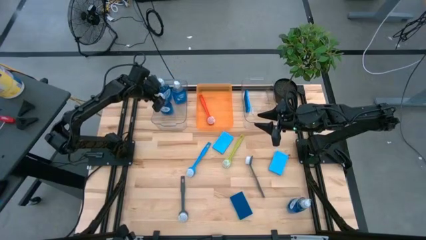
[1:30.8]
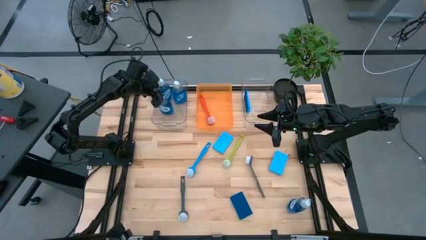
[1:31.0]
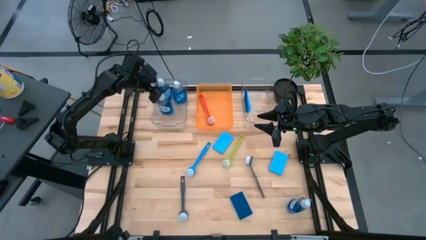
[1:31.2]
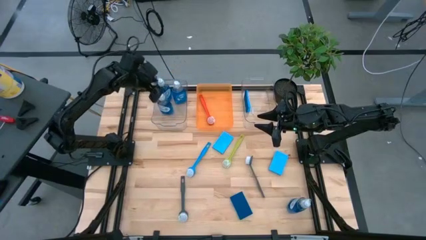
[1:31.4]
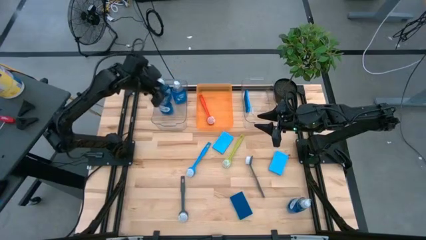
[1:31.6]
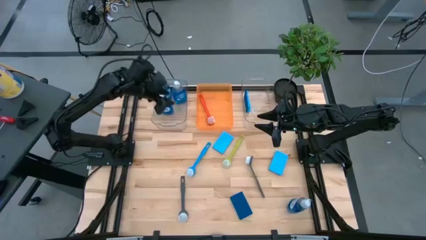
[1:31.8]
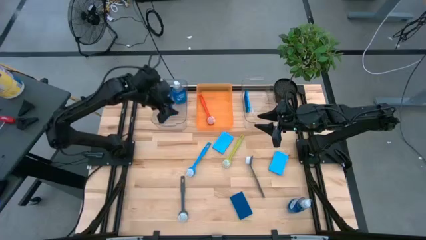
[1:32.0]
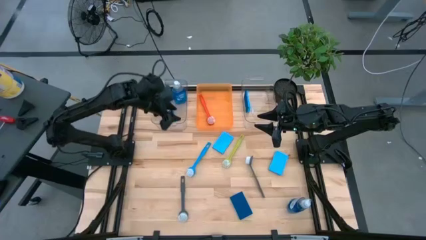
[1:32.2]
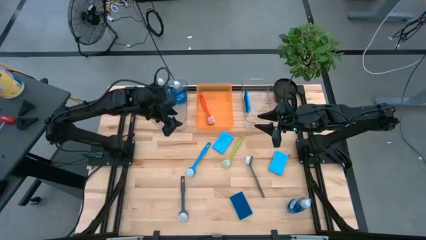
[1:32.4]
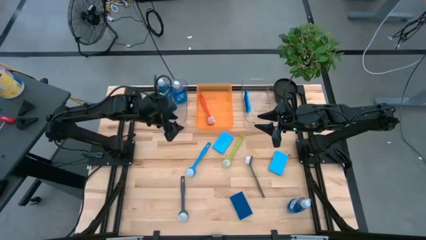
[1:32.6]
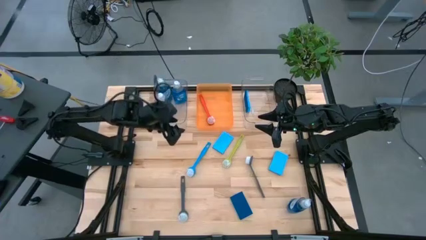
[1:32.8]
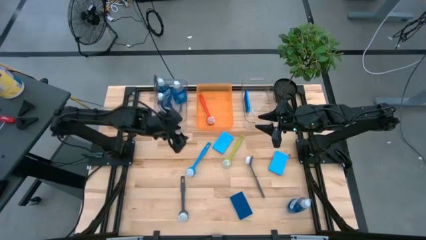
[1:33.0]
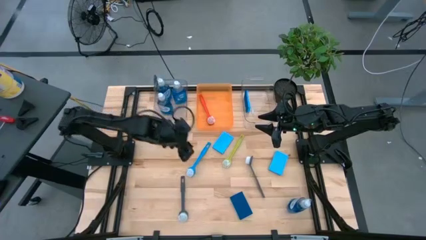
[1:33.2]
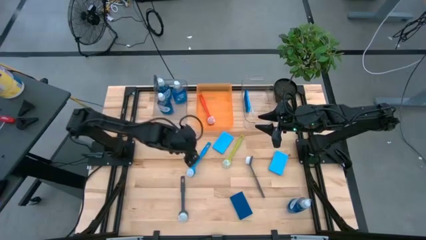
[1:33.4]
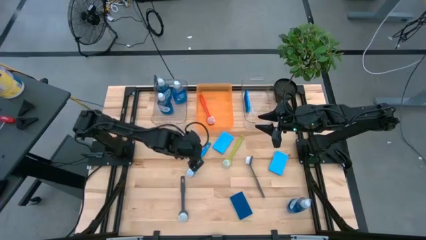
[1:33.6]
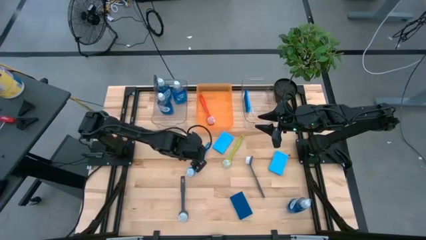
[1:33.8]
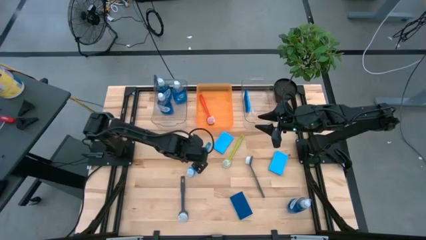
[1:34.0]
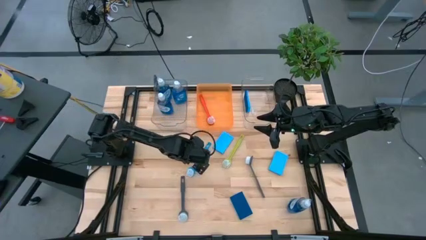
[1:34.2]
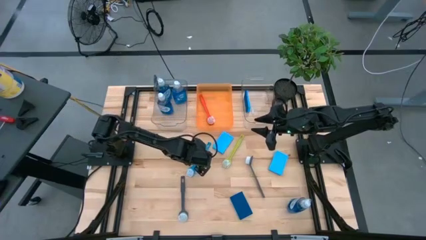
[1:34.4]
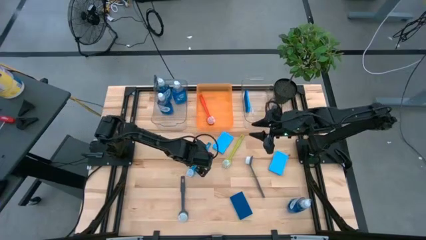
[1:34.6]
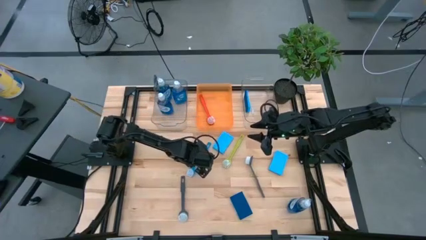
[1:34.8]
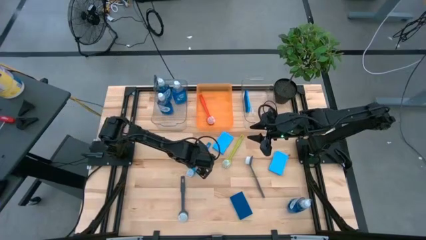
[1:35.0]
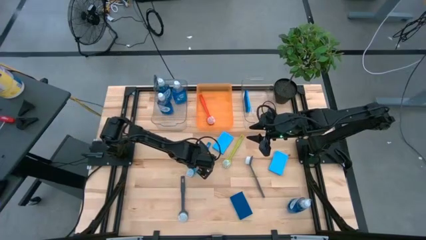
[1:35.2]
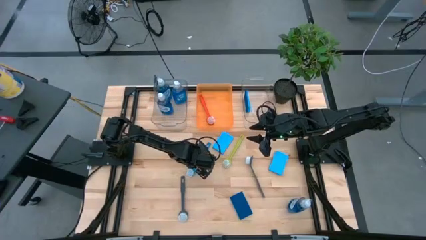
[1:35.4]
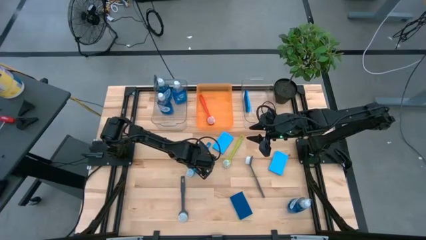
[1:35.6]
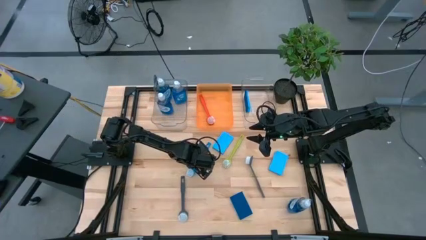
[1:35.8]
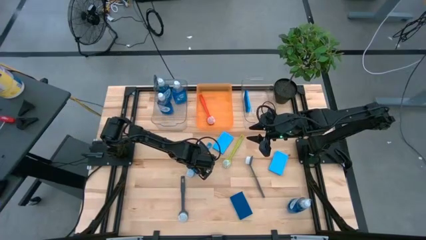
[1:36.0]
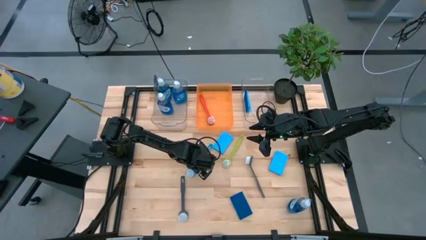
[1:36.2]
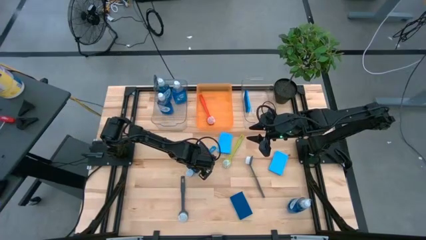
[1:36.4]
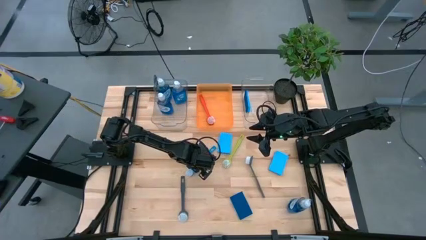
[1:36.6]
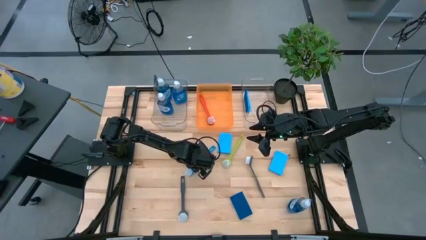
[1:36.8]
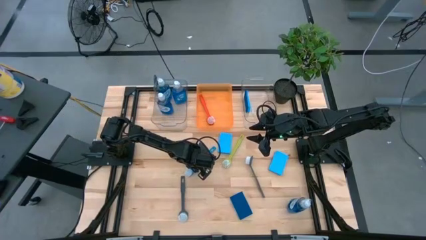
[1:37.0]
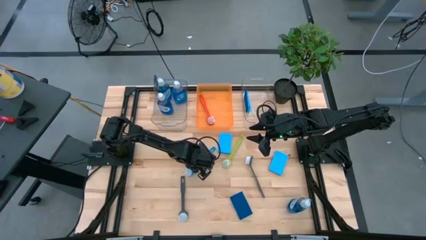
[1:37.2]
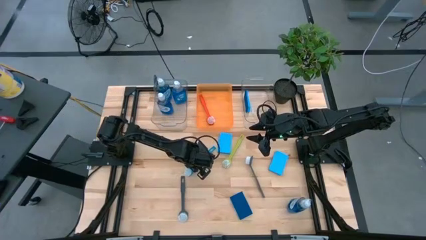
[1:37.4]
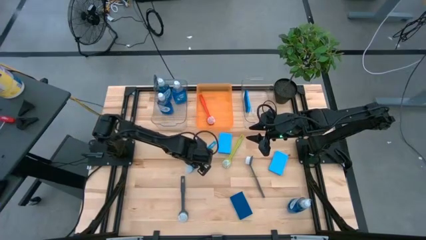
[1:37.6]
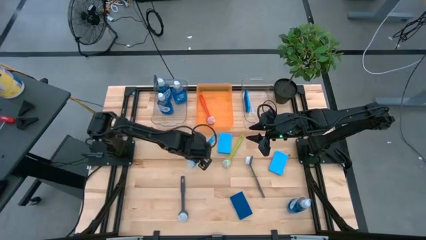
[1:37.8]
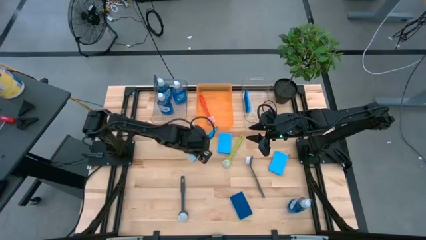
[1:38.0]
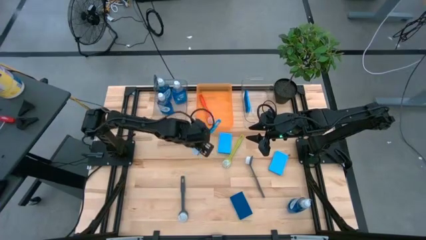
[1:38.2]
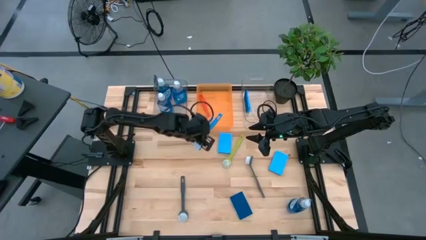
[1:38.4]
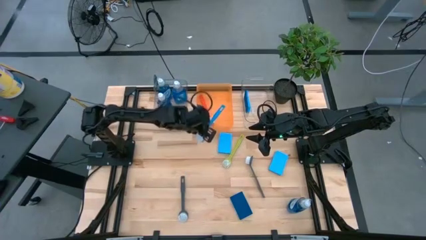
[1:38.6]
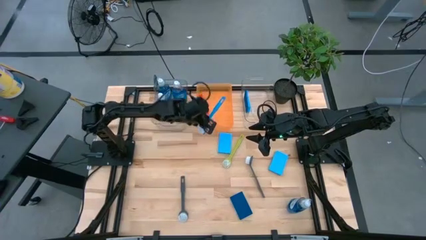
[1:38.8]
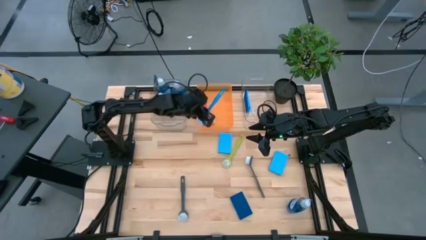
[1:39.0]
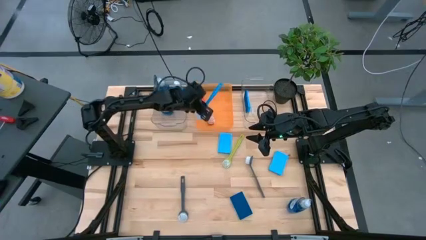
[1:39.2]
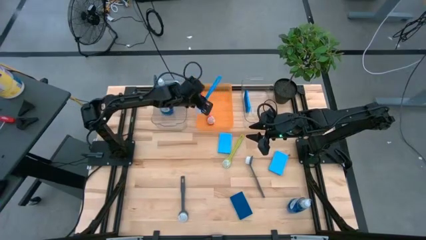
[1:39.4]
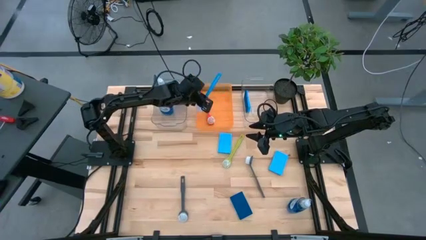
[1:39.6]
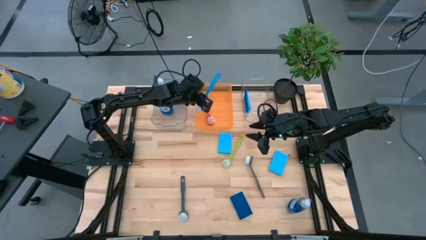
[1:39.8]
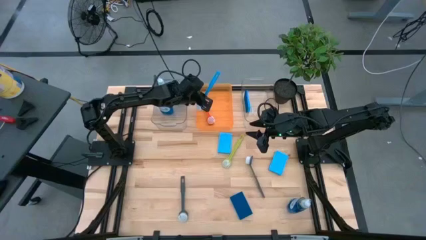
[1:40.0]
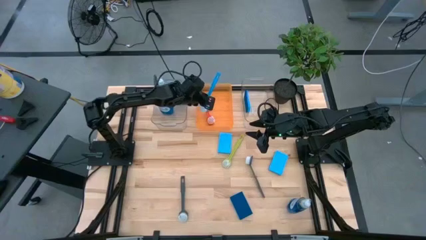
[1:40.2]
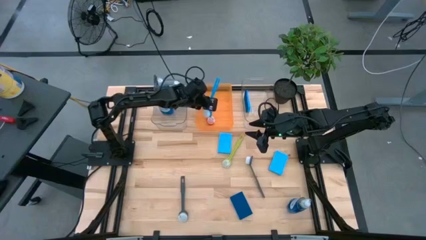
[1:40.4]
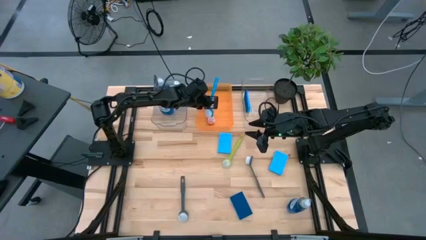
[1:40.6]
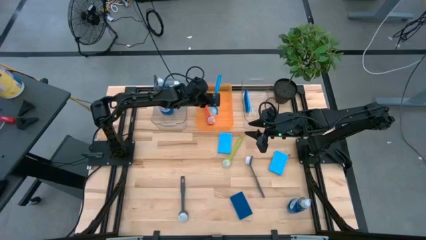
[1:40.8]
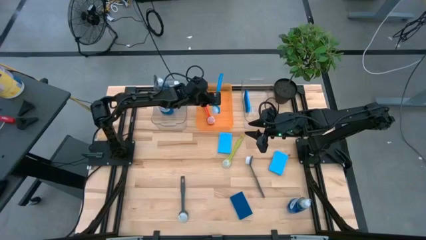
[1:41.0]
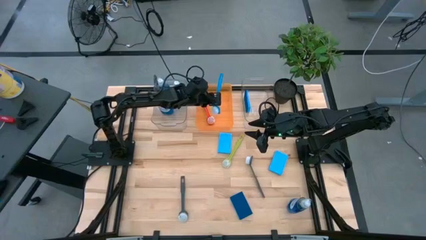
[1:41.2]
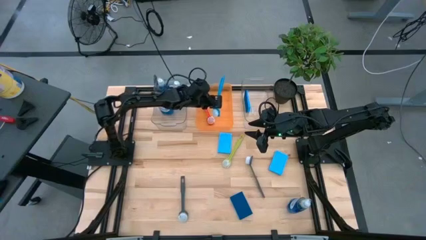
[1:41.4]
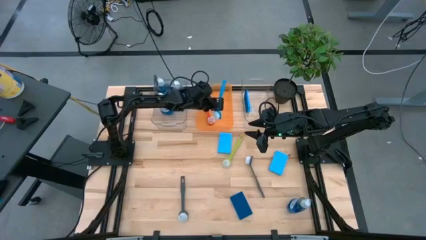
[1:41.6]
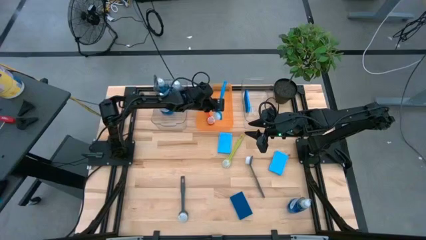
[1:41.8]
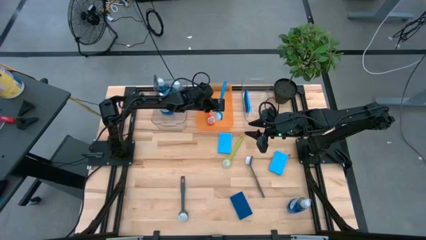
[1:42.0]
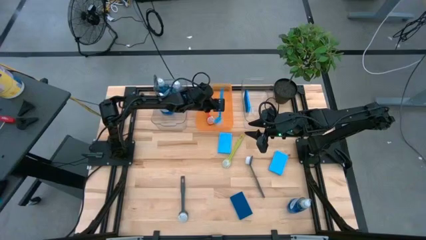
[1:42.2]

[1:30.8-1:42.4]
Task: Pick & Place Kitchen Sink Supplies
Put the blue dish brush into the orange bin
